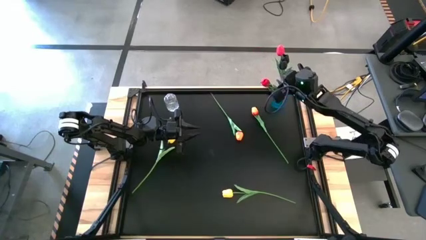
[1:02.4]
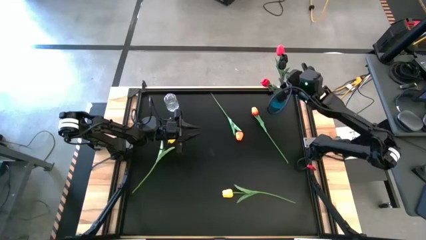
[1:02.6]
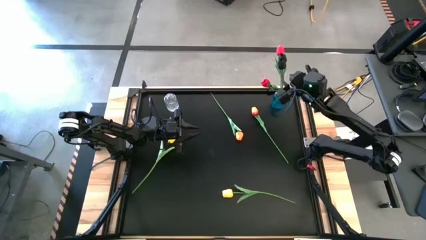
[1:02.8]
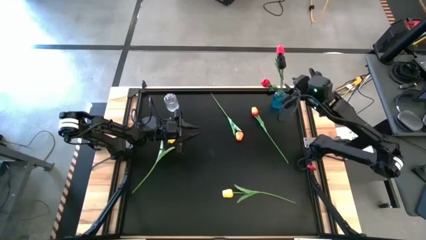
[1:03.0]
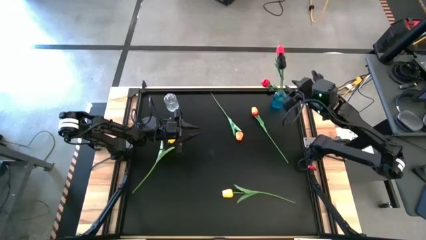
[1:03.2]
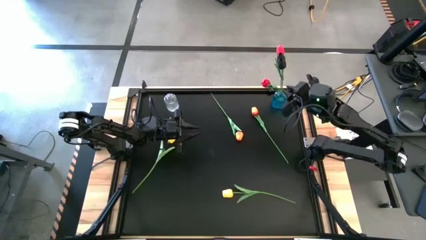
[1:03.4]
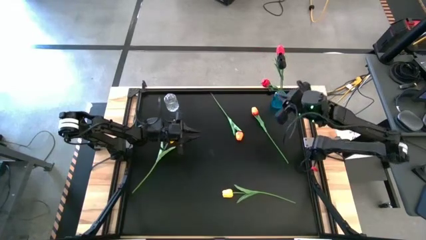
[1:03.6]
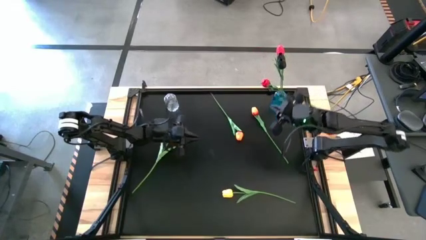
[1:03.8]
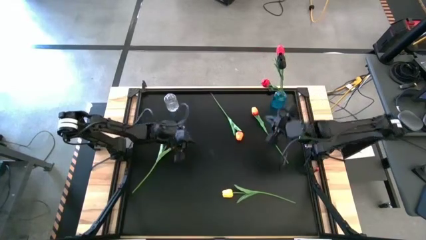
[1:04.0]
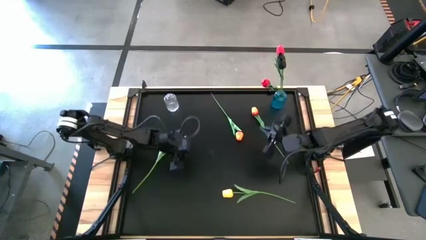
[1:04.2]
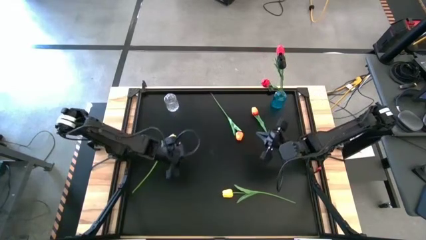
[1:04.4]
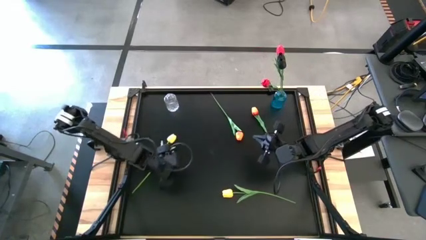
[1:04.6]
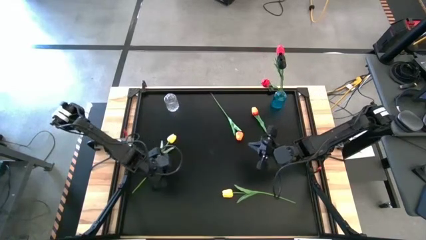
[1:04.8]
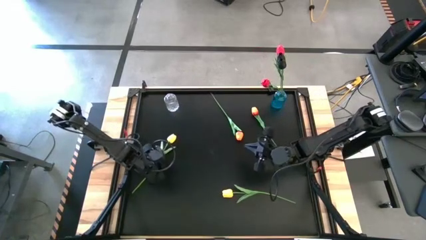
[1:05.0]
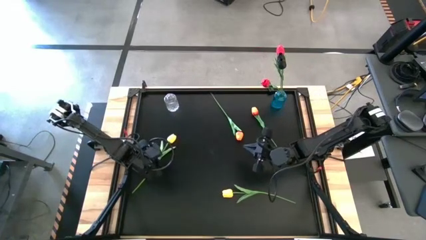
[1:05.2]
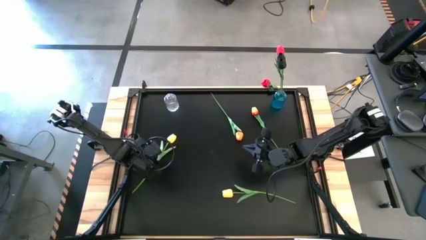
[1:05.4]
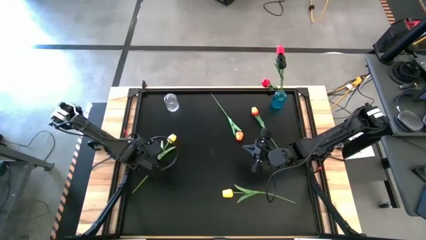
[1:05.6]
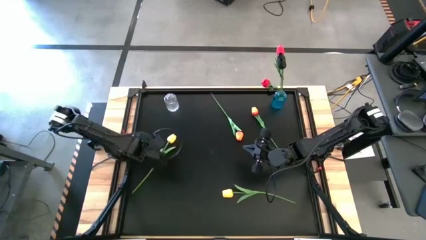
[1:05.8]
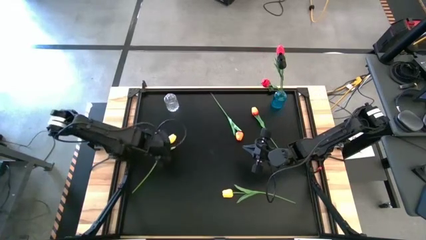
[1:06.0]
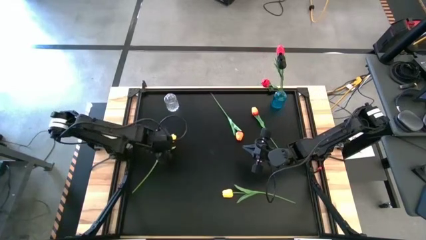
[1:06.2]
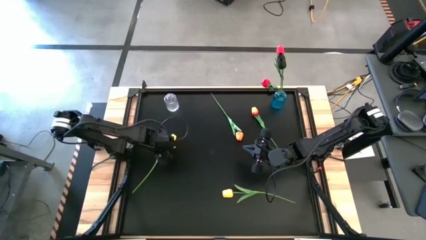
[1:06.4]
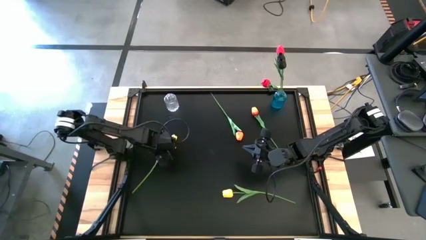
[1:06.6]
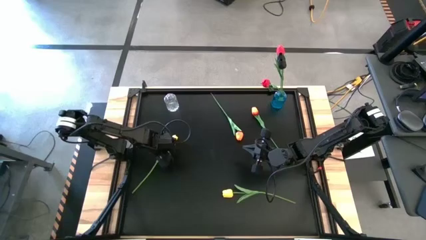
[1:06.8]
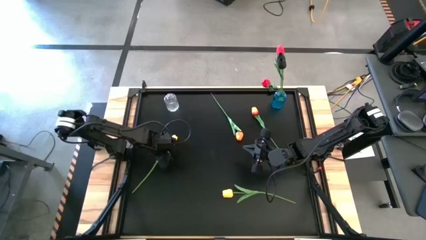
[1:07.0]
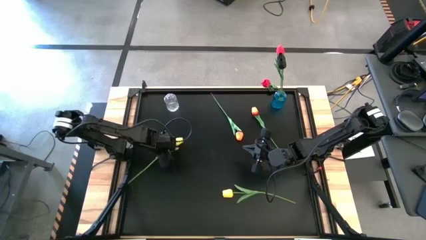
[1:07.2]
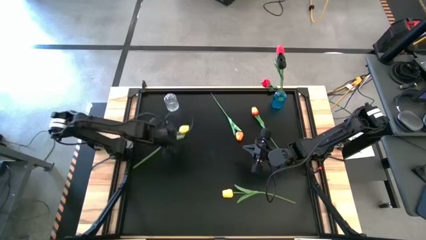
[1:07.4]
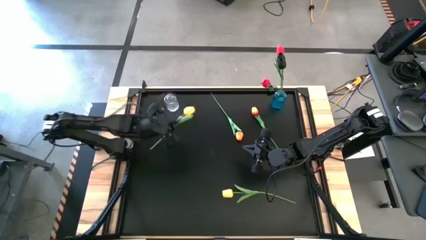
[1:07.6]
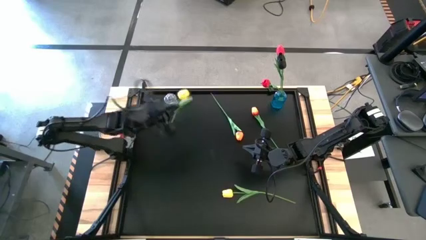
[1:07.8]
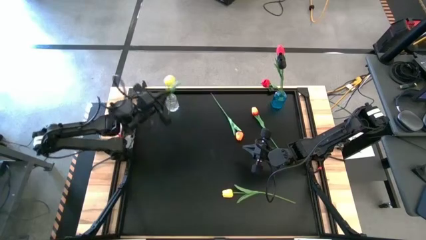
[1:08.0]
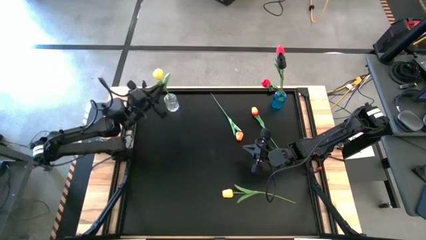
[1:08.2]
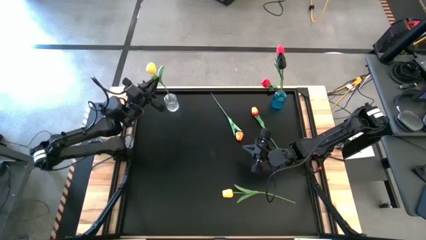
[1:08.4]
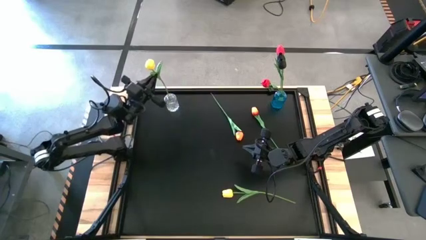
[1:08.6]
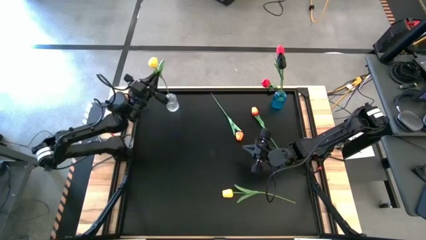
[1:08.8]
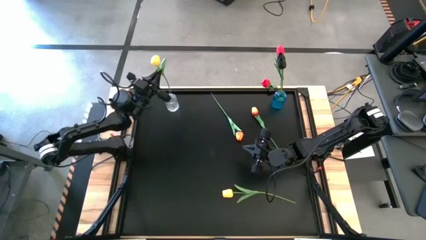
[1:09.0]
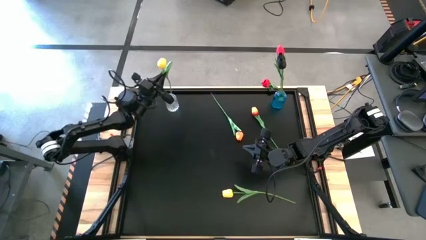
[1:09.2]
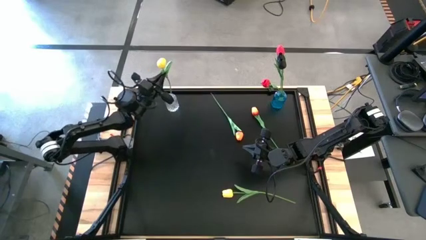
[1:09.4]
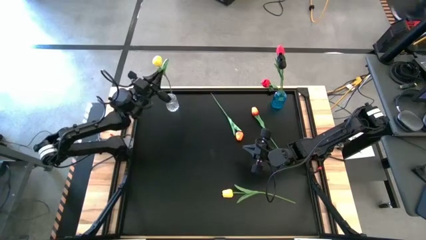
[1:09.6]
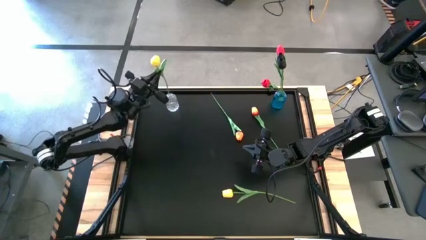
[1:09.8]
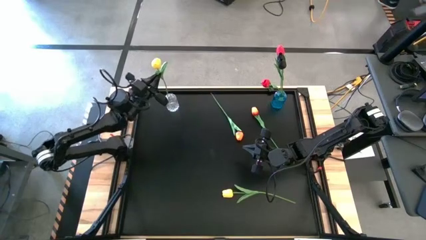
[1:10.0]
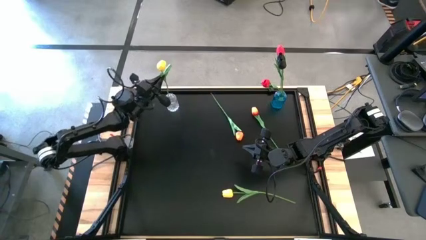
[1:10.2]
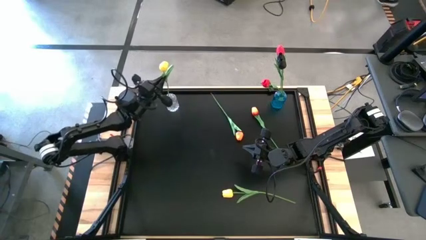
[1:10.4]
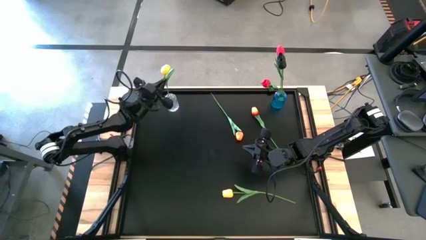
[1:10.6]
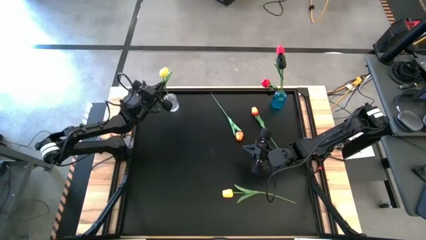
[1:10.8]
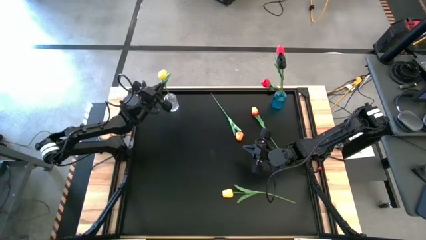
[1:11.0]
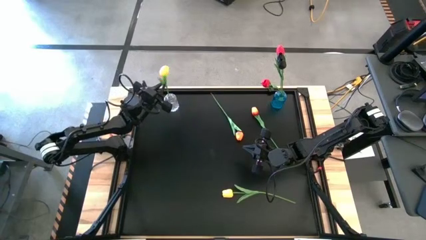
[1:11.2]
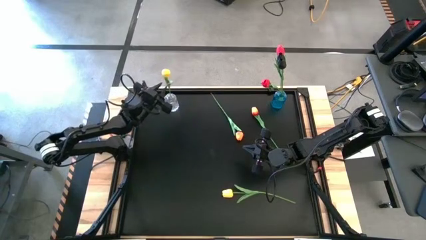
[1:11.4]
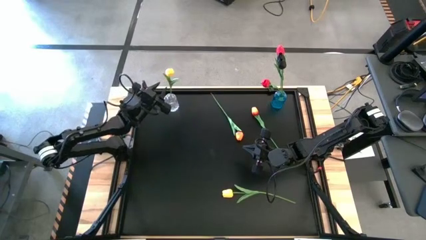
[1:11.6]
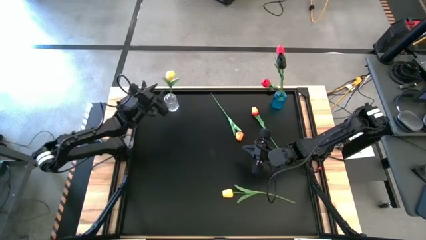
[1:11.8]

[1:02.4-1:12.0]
Task: Sort flowers into vase by color
Put the left yellow tulip into the transparent vase

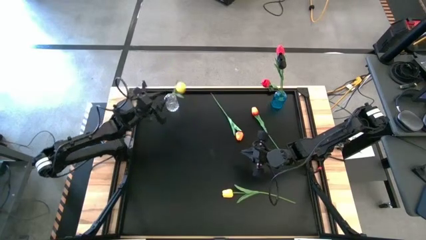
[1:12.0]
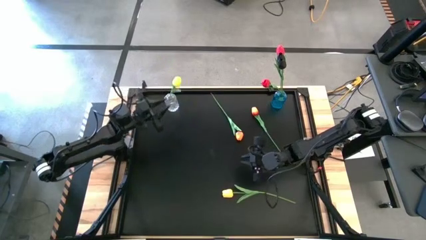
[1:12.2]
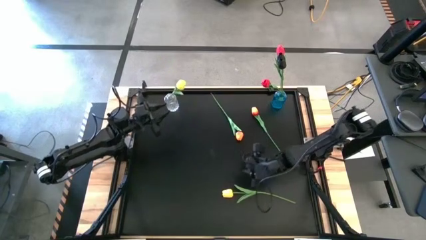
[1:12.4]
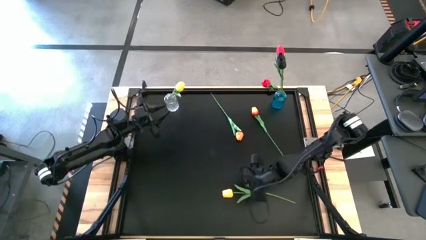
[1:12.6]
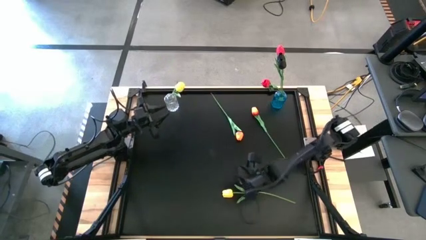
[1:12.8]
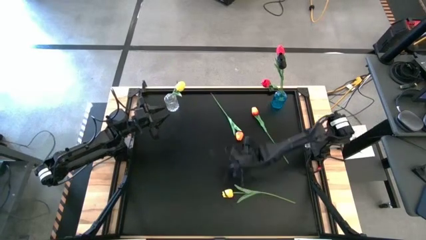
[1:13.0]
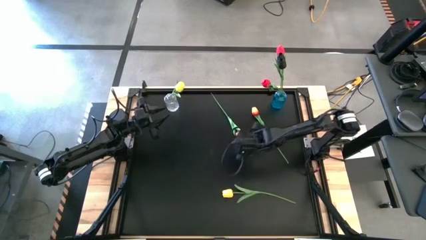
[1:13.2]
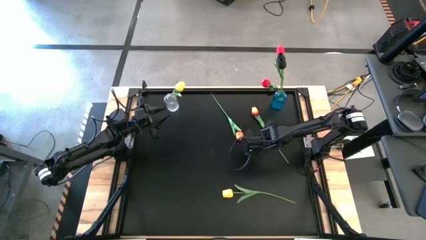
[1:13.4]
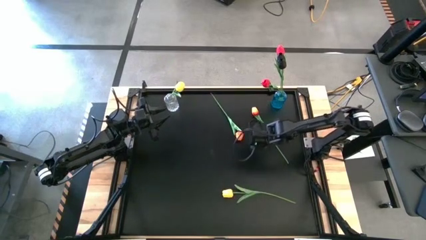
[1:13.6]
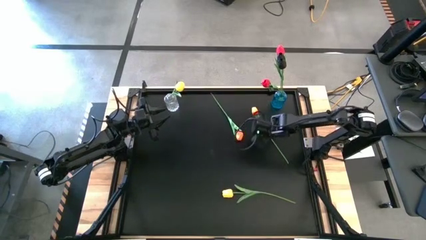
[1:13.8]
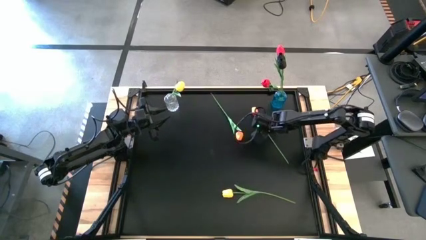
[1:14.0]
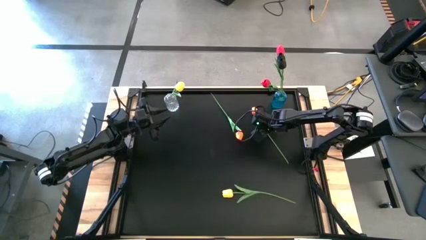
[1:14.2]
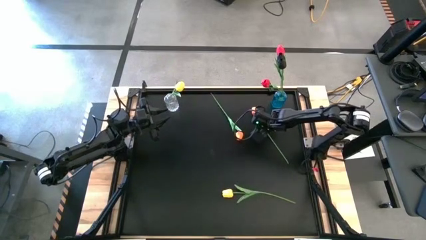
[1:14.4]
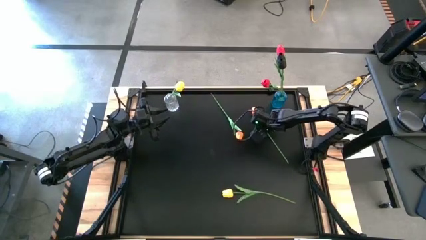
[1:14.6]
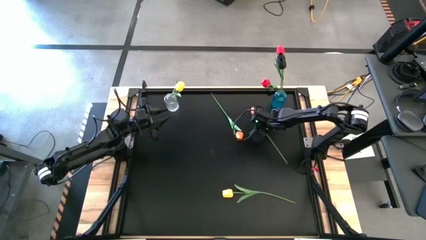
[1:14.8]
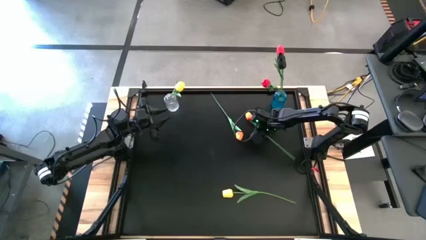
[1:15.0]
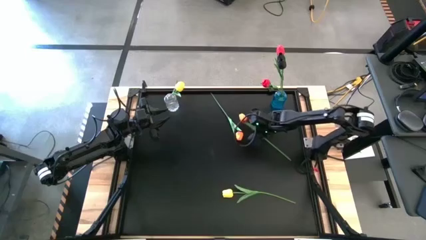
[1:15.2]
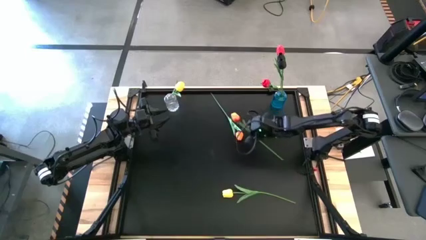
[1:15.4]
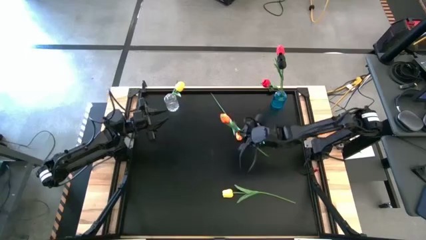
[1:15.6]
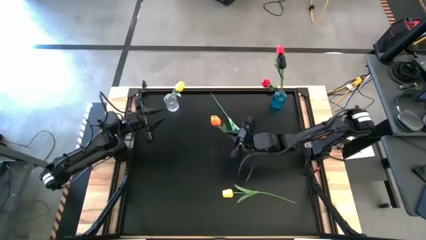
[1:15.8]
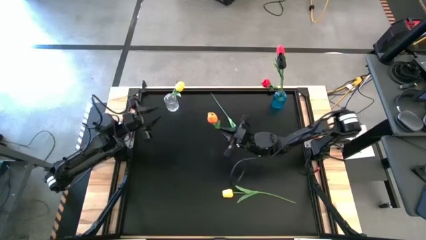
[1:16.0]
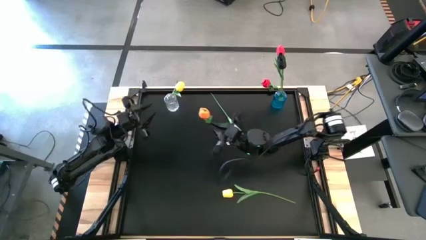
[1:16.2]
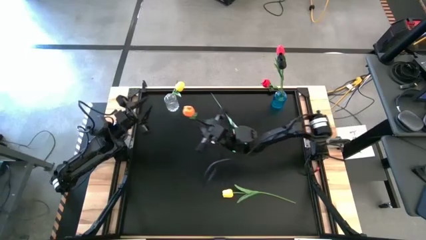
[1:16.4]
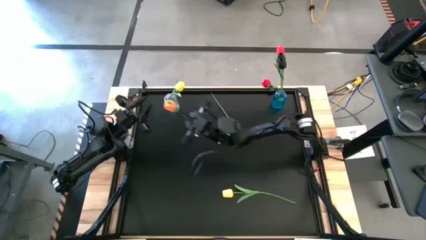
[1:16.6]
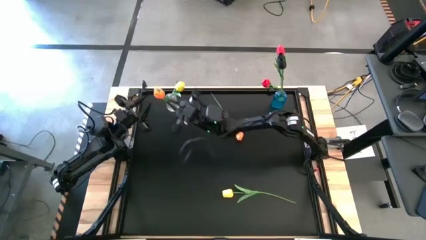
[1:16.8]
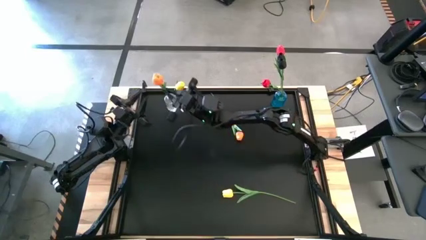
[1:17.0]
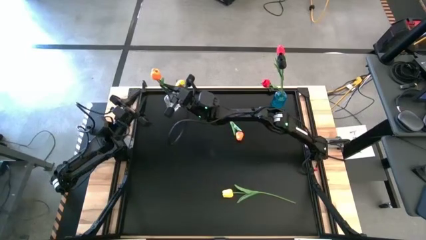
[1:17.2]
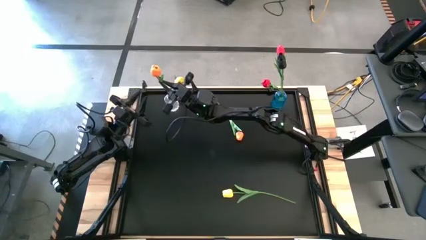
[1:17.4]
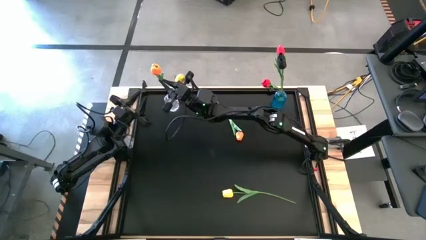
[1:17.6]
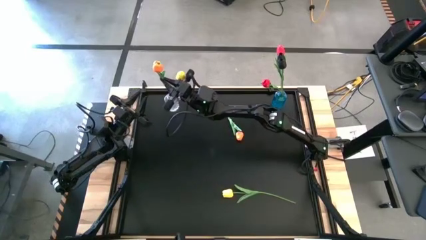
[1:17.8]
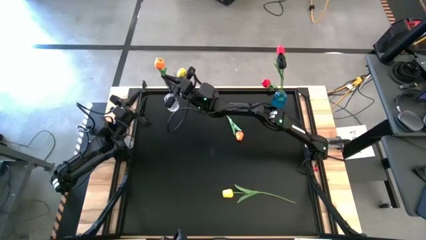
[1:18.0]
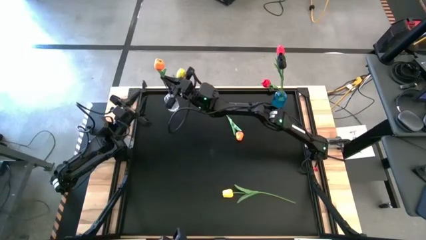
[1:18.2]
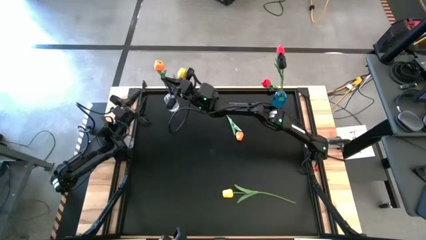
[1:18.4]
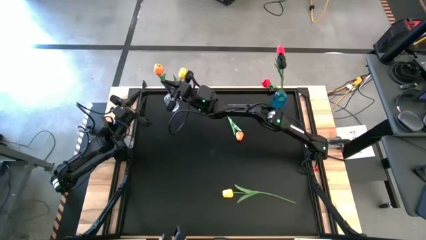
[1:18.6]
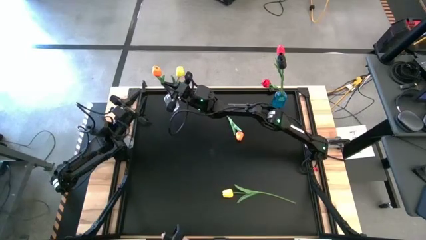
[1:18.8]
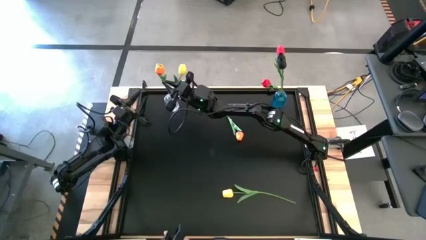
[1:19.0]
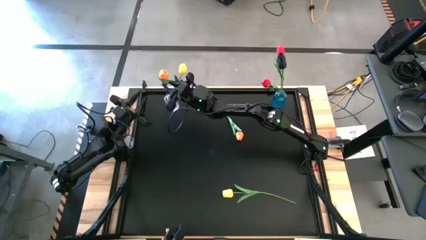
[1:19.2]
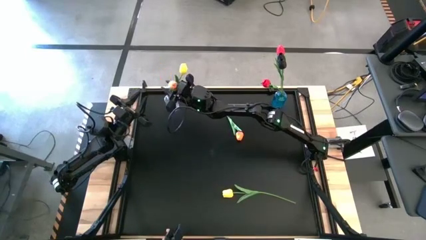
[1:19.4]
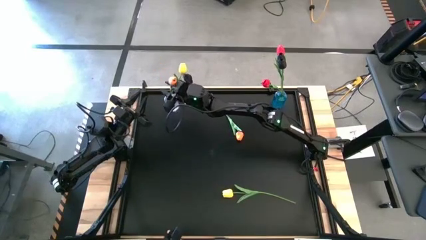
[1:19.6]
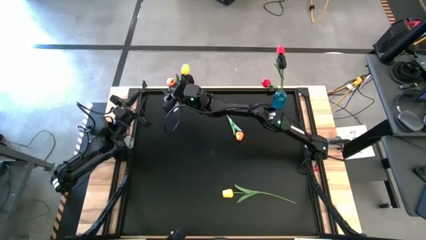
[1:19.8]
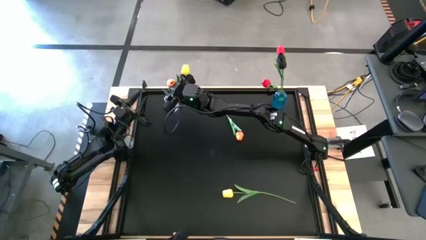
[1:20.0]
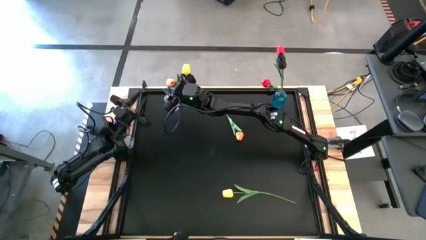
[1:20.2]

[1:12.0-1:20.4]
Put the right orange tulip into the transparent vase
